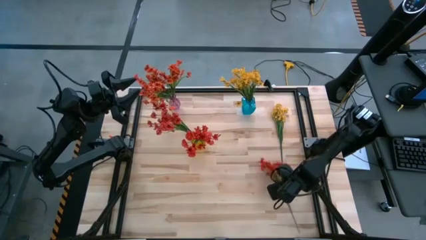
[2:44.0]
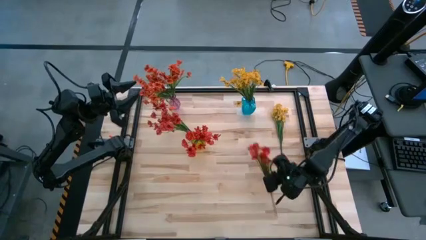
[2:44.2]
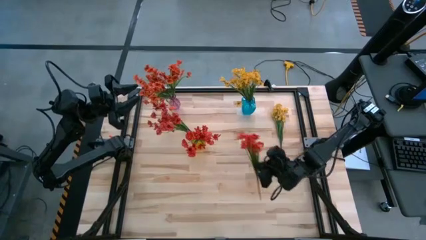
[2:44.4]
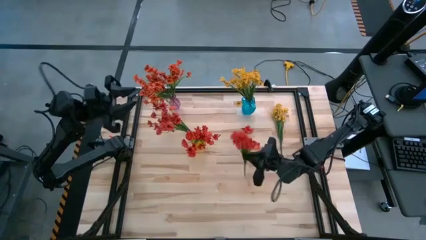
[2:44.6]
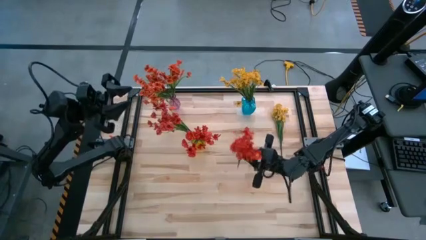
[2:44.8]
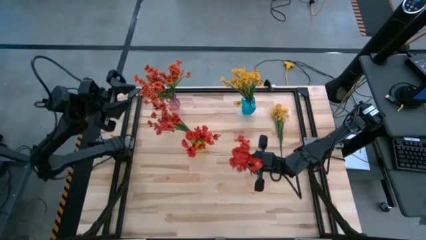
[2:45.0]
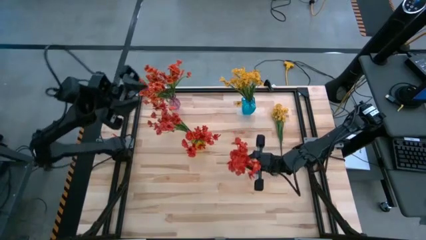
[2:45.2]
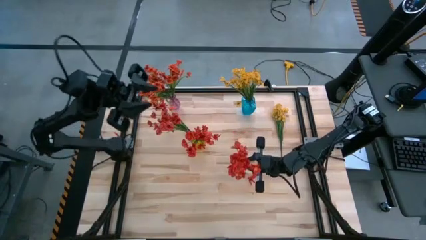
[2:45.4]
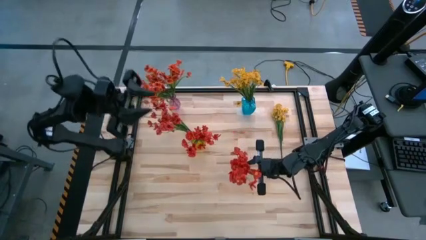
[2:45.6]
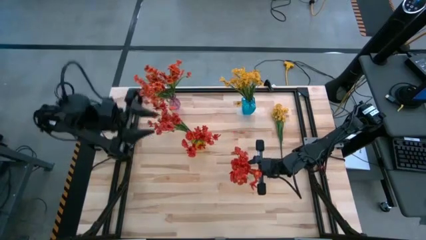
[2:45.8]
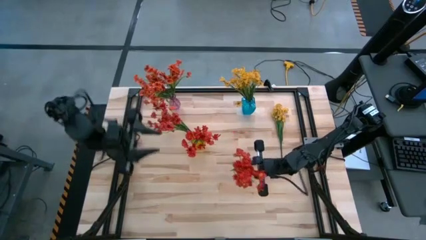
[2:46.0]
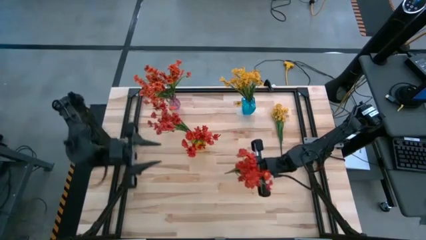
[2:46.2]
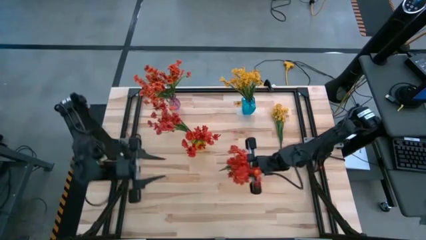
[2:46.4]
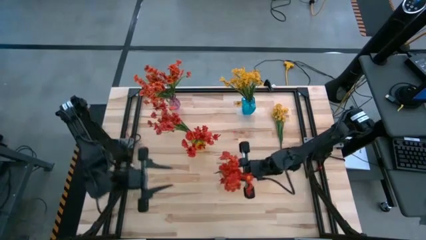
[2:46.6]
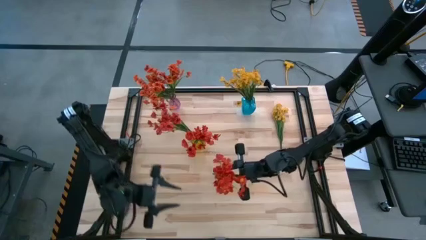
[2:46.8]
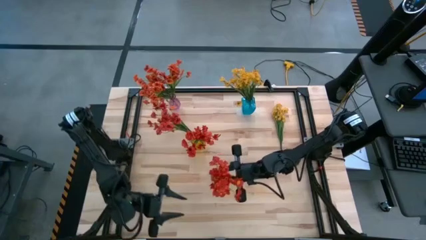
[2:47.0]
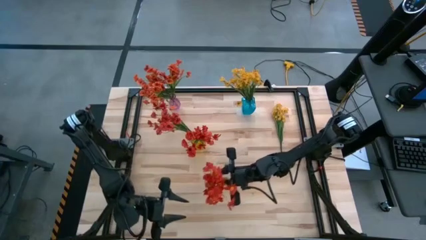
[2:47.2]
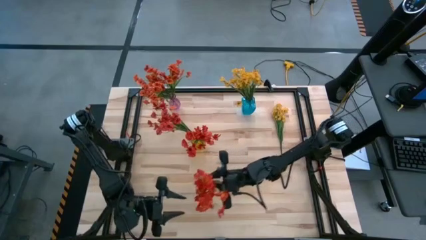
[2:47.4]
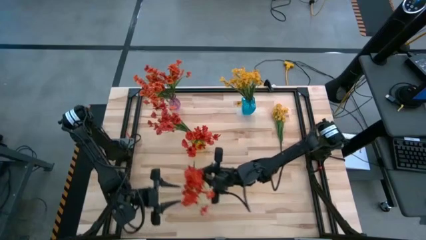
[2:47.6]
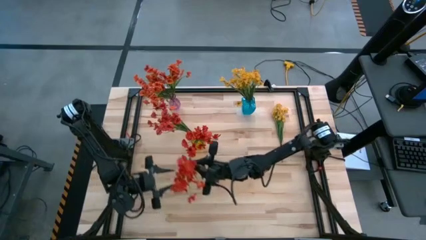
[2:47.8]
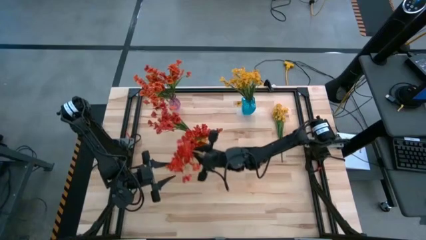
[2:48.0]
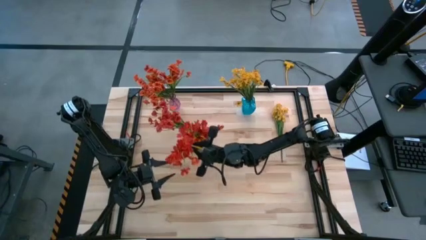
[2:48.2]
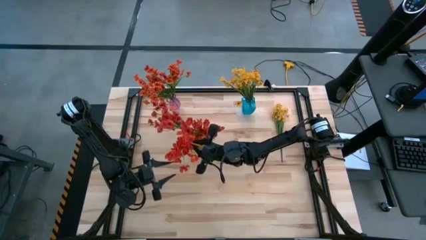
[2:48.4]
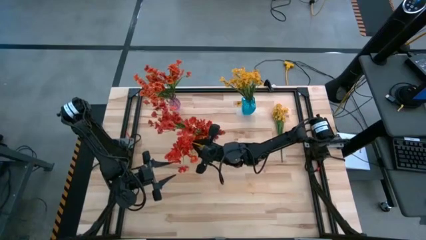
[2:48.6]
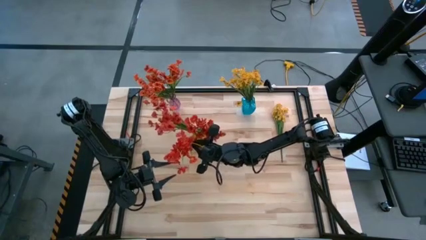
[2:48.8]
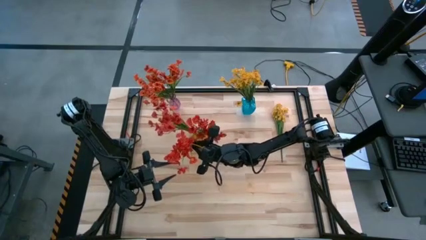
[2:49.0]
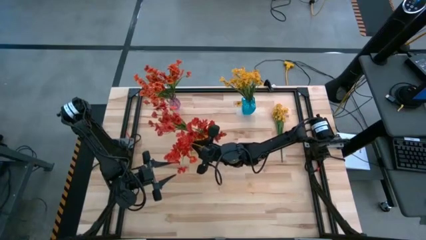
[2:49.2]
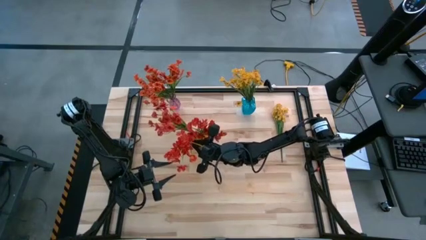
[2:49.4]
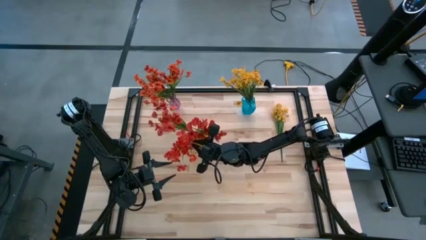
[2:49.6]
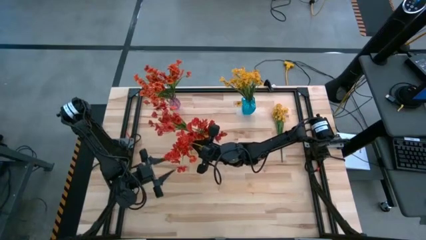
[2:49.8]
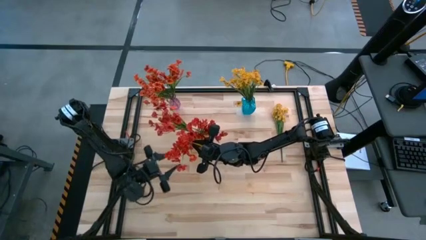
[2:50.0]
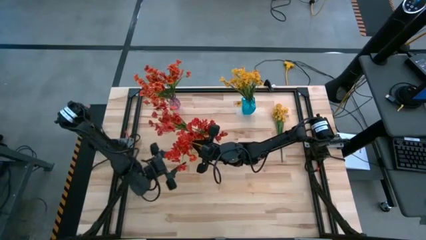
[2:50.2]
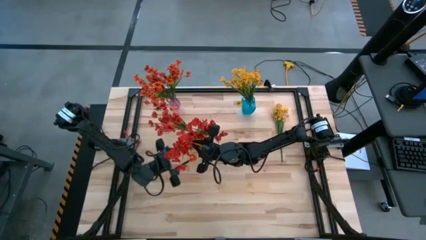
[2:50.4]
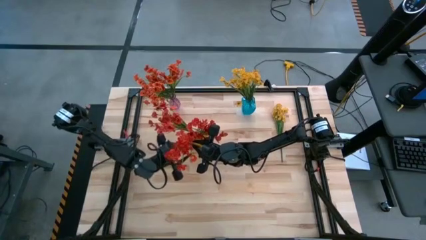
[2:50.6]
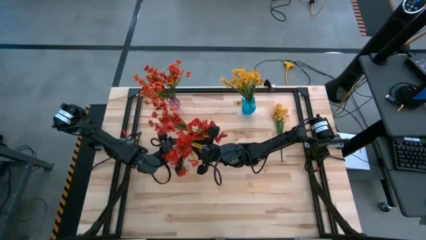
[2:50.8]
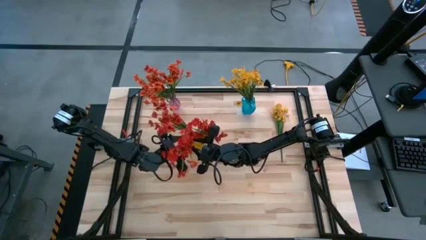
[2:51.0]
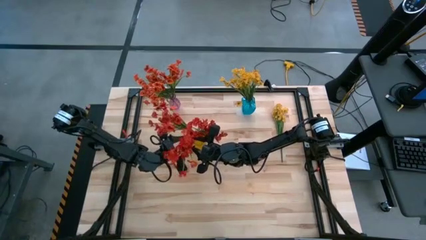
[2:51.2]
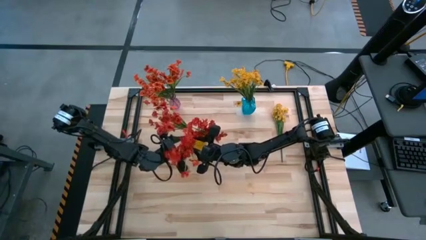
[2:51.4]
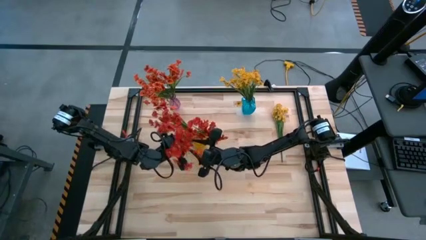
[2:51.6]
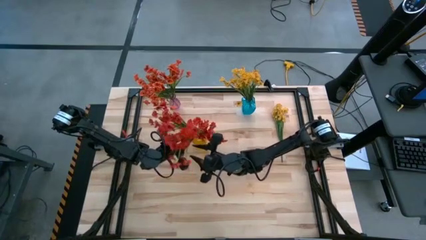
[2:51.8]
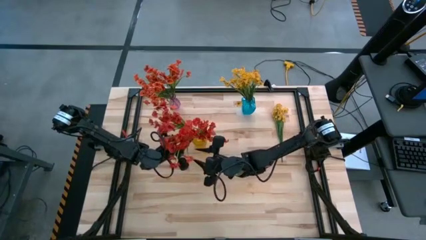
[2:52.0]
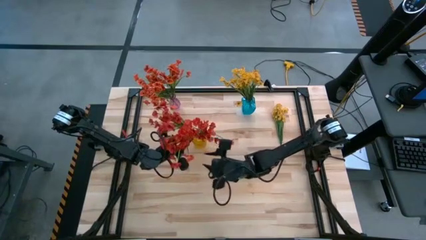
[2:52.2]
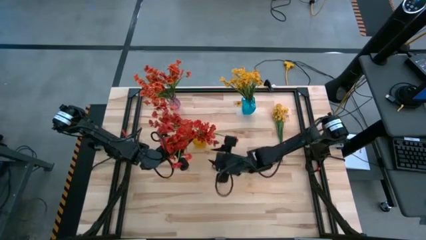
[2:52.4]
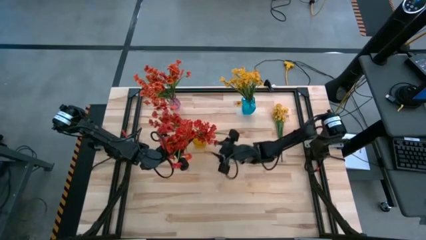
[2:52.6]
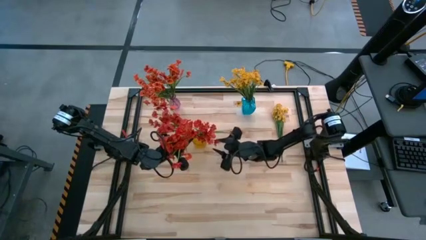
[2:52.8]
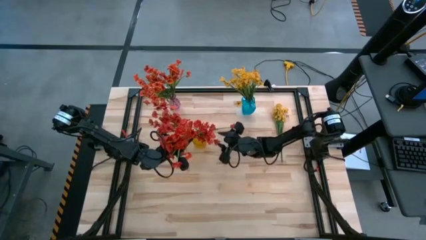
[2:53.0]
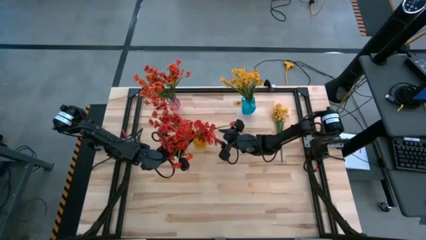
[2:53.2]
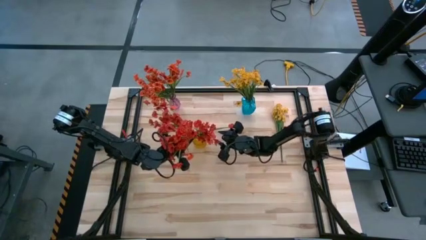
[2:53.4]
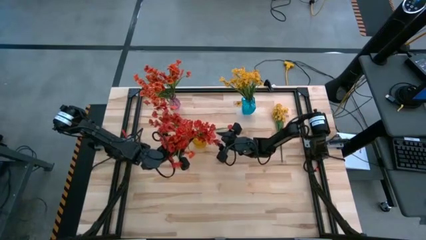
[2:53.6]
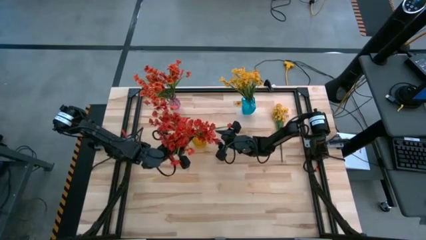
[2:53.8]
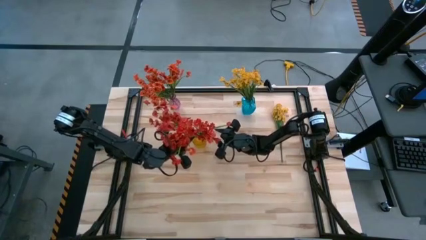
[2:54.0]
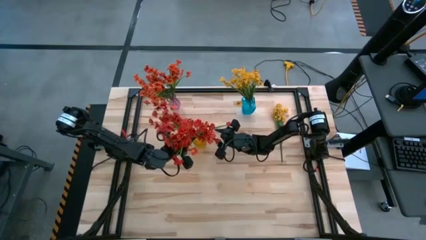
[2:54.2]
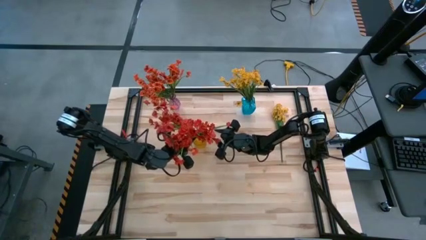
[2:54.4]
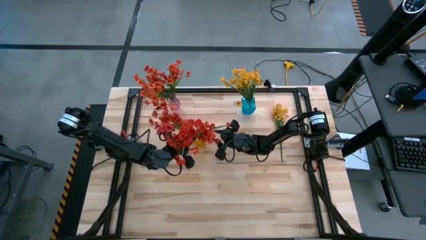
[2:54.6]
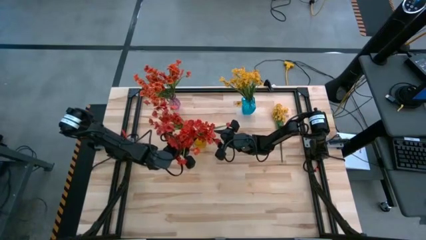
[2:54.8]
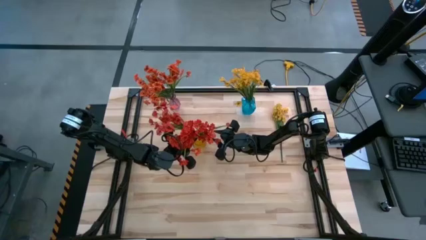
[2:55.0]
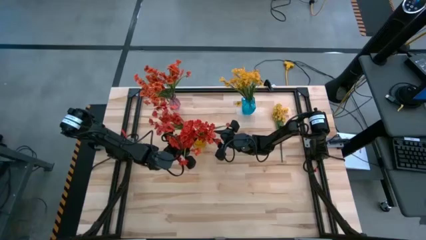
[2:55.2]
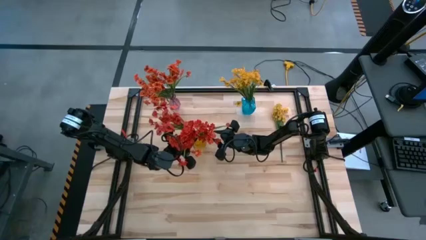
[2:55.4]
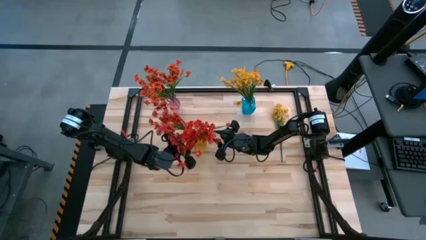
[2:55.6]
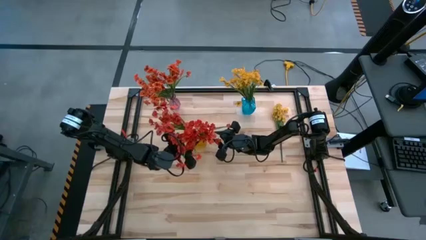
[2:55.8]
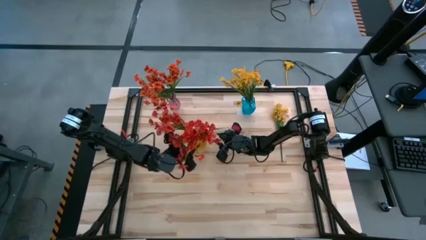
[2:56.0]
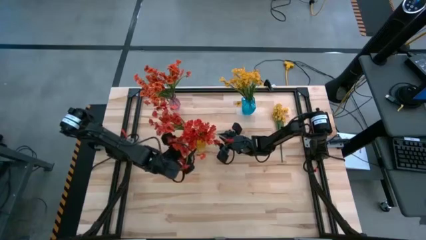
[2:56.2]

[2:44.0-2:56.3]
Task: Sort flowers into vase by color
Put the red flower into the yellow vase

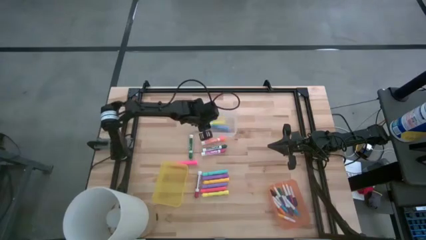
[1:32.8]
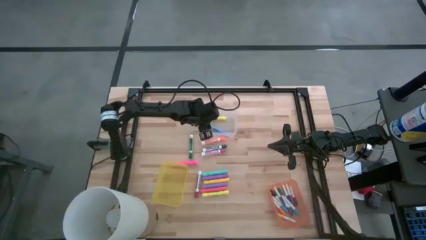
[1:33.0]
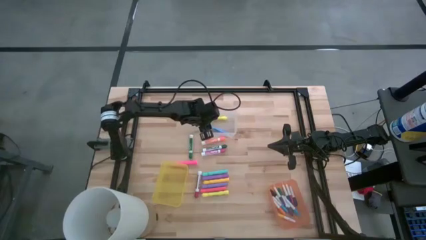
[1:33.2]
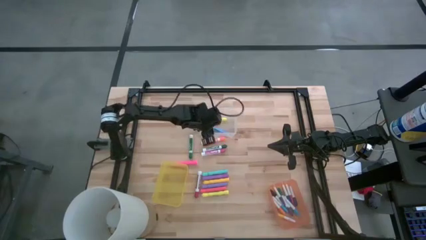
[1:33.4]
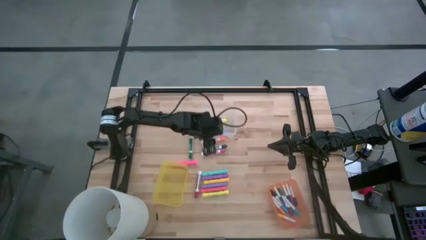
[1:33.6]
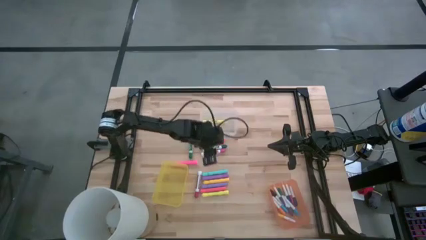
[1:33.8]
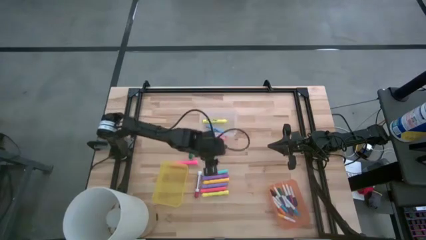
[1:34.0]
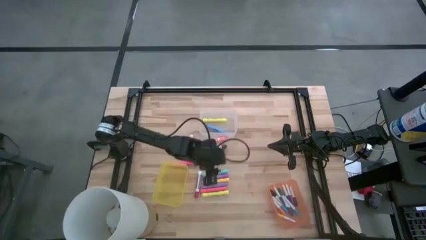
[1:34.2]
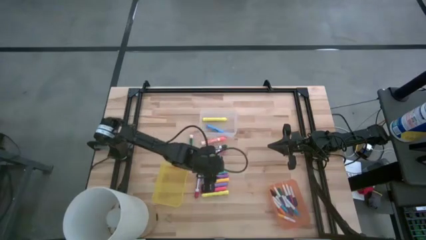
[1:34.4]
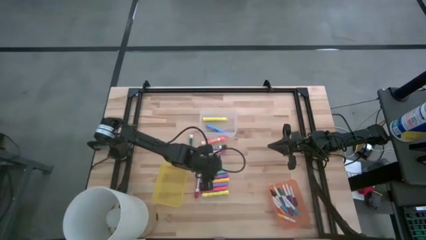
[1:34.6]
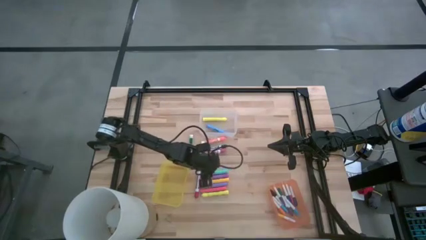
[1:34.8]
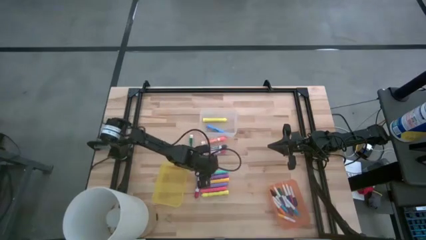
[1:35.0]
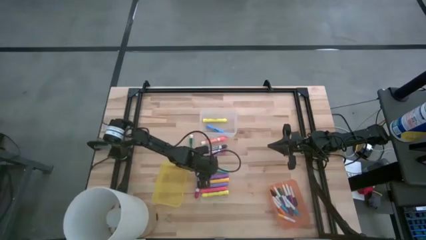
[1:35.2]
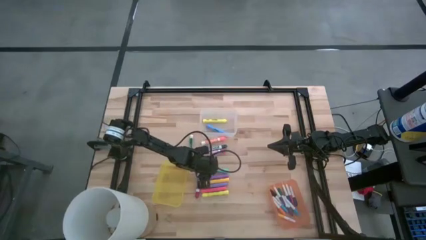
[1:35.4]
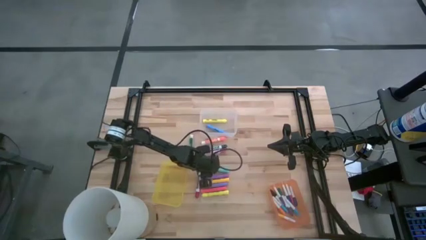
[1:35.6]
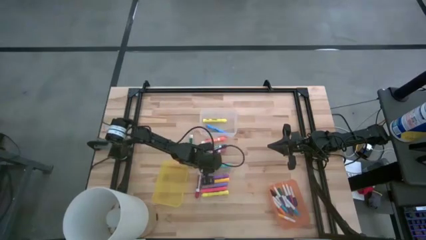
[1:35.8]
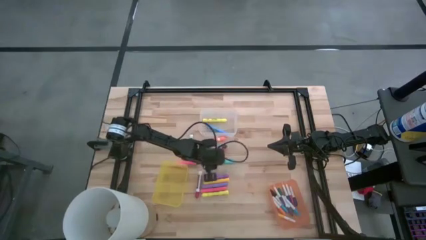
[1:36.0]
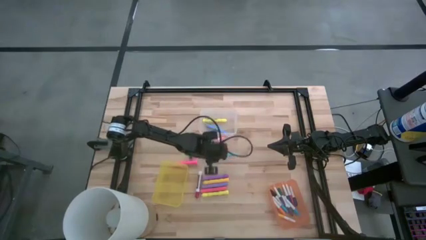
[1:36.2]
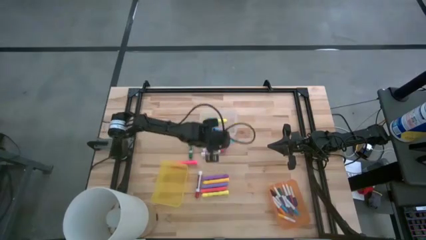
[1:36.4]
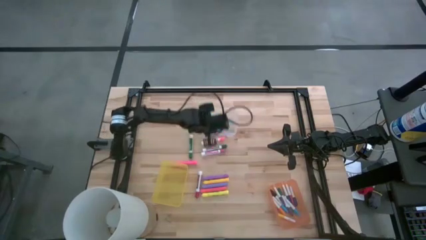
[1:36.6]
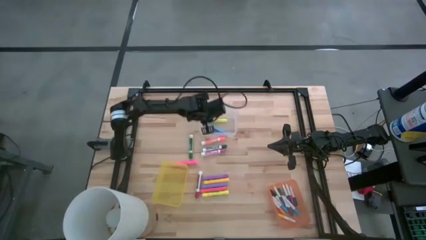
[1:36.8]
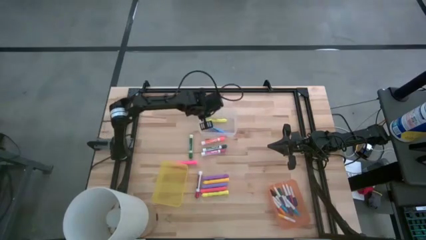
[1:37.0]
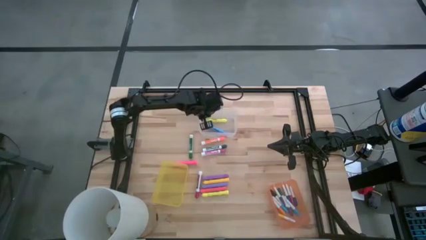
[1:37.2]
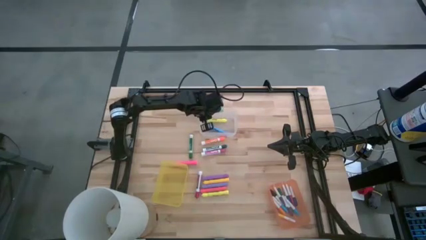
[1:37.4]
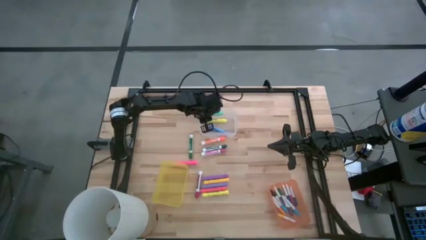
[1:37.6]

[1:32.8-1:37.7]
Task: Pick & Place Markers
Put the large light blue highlighter pen into the transparent bin
